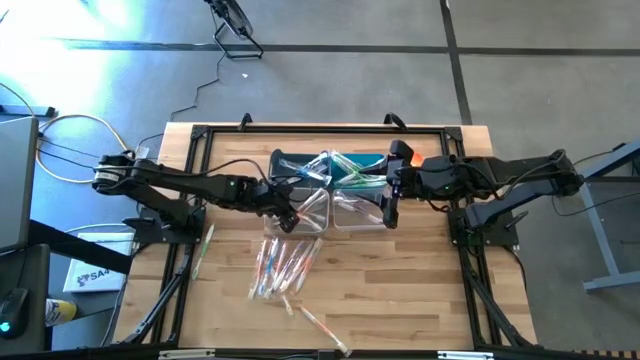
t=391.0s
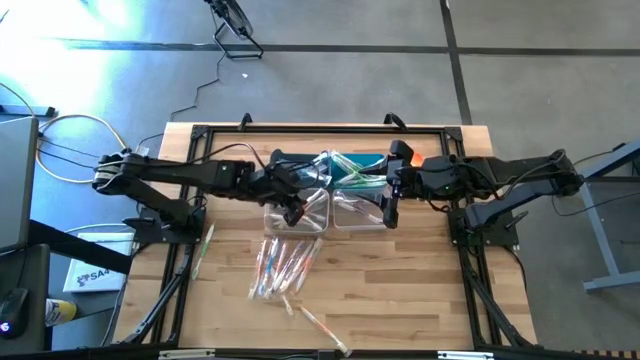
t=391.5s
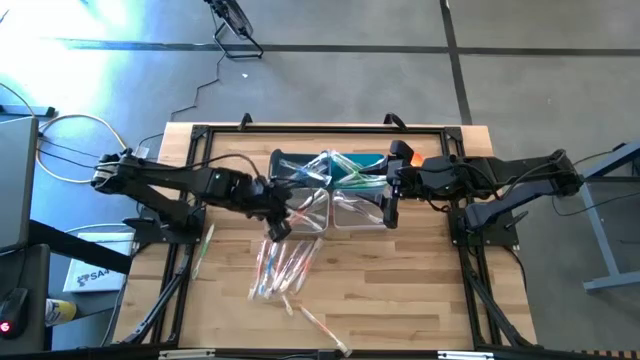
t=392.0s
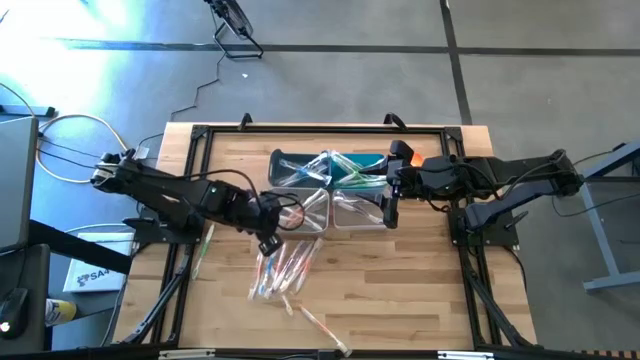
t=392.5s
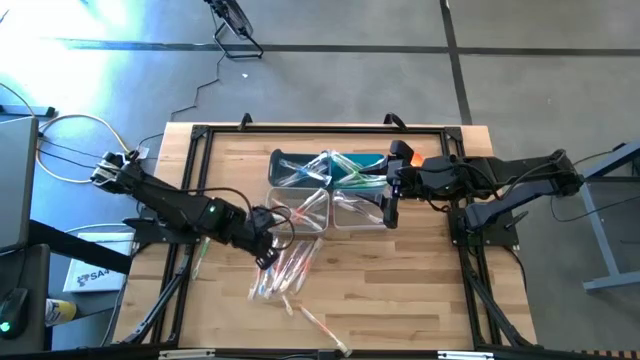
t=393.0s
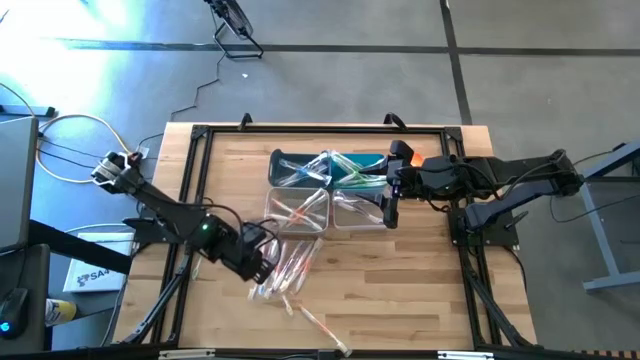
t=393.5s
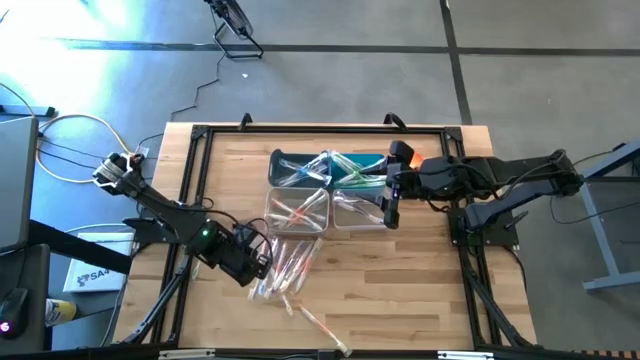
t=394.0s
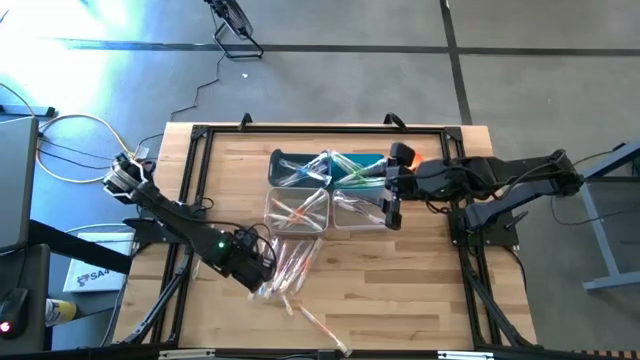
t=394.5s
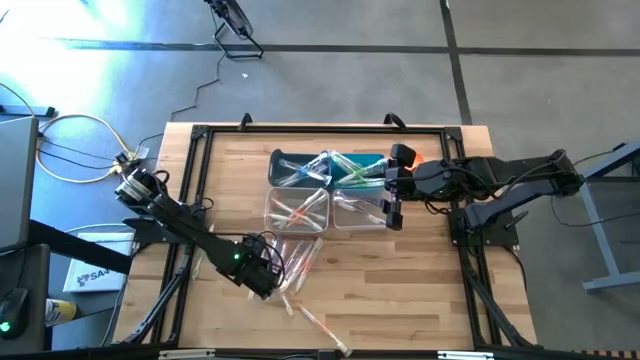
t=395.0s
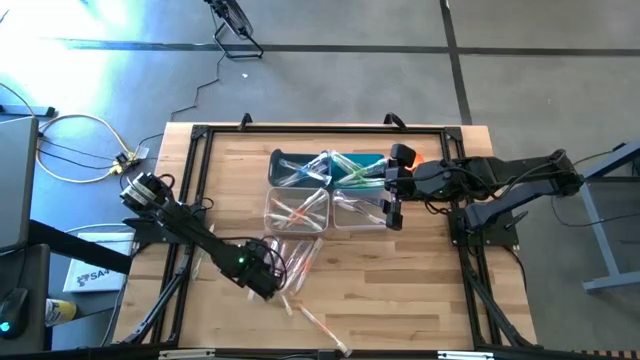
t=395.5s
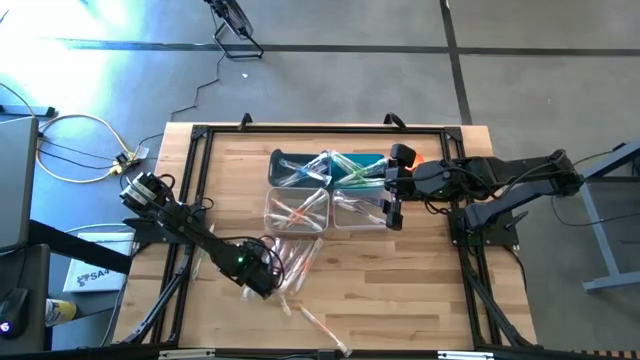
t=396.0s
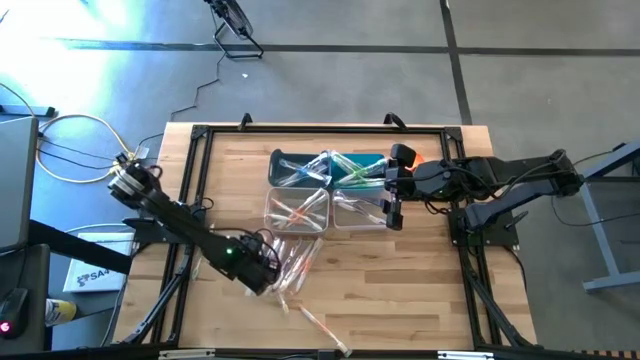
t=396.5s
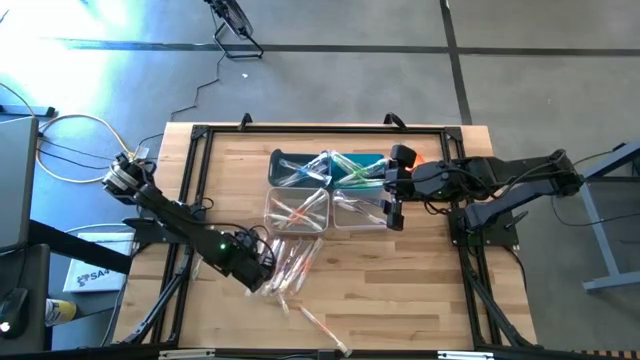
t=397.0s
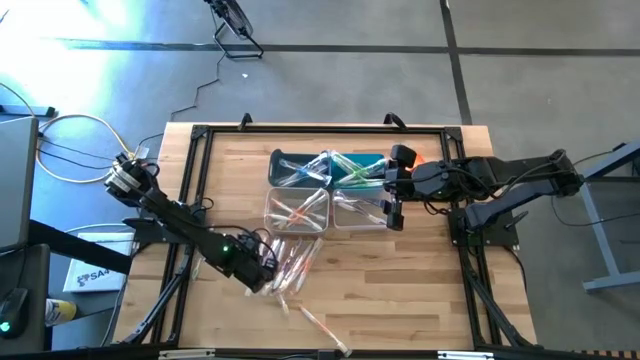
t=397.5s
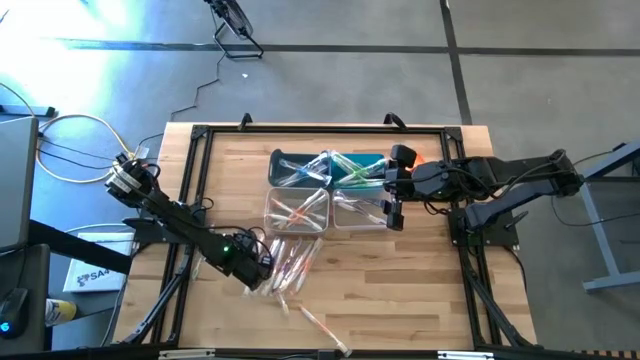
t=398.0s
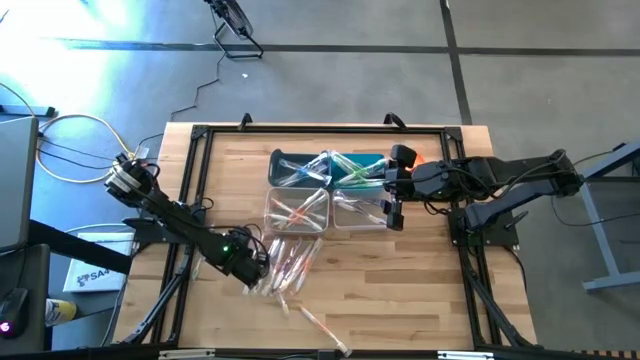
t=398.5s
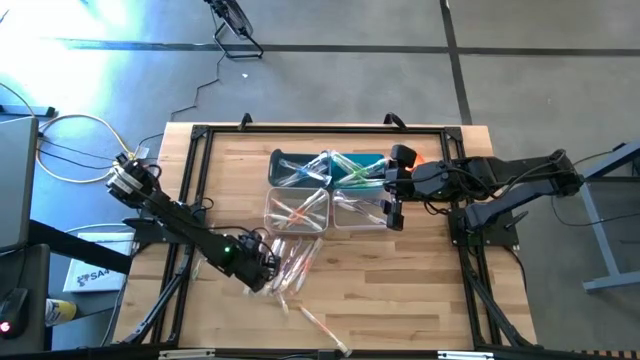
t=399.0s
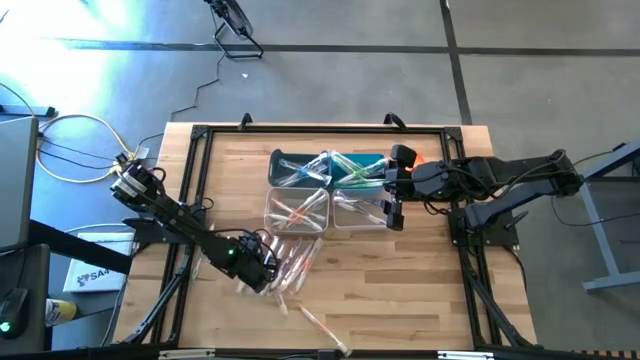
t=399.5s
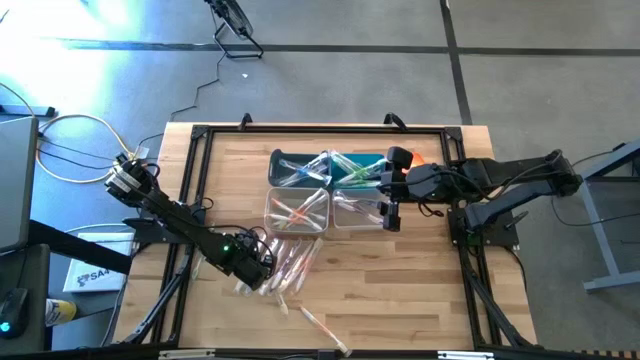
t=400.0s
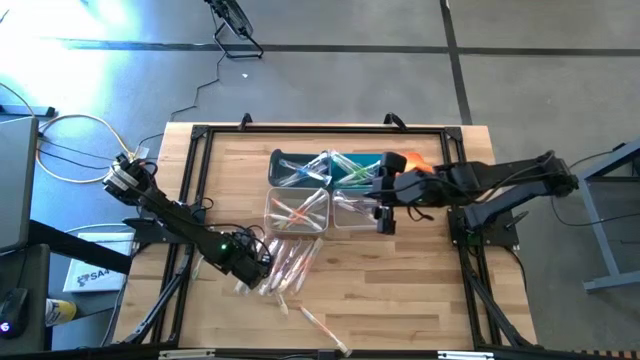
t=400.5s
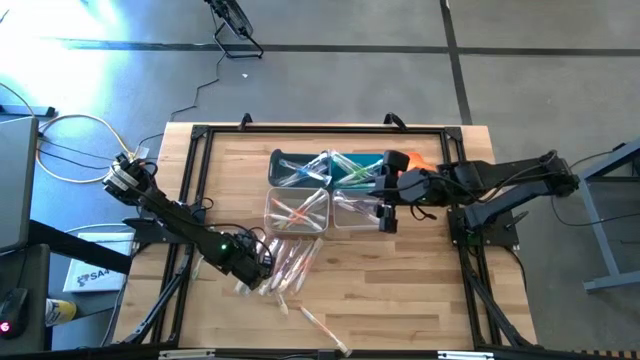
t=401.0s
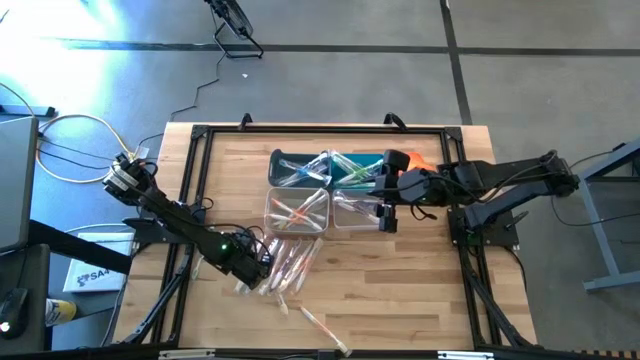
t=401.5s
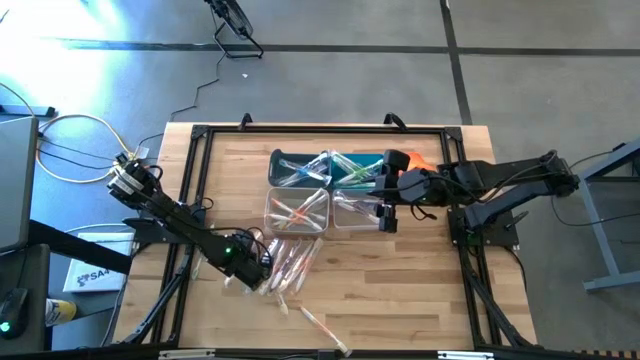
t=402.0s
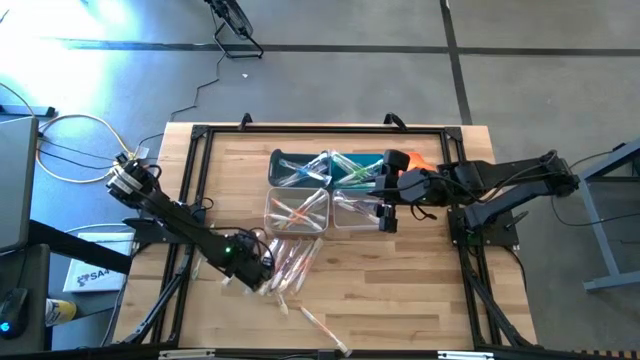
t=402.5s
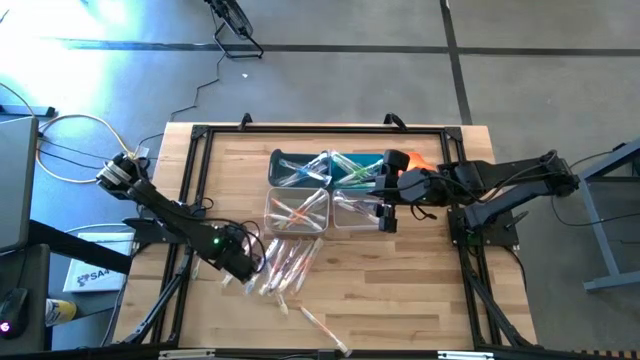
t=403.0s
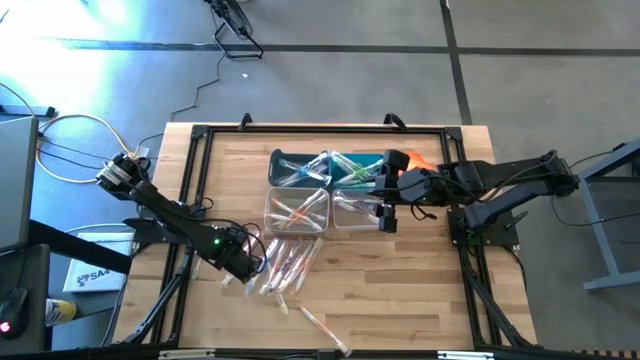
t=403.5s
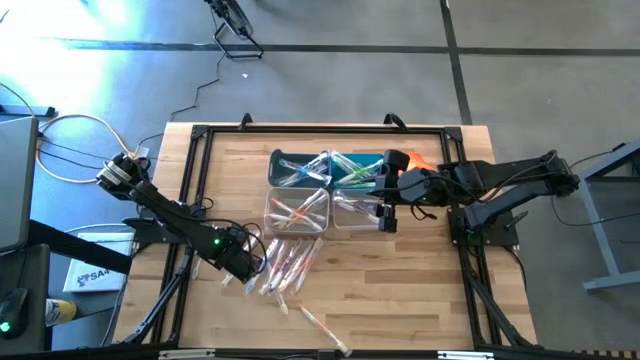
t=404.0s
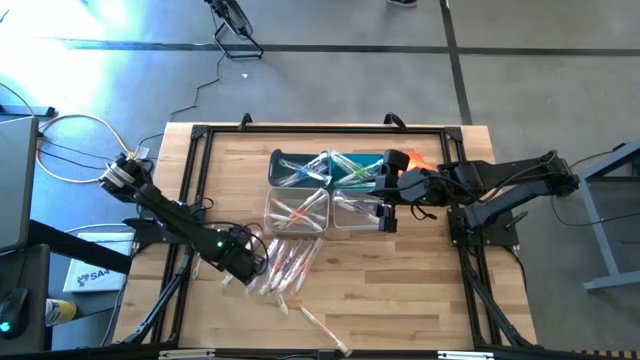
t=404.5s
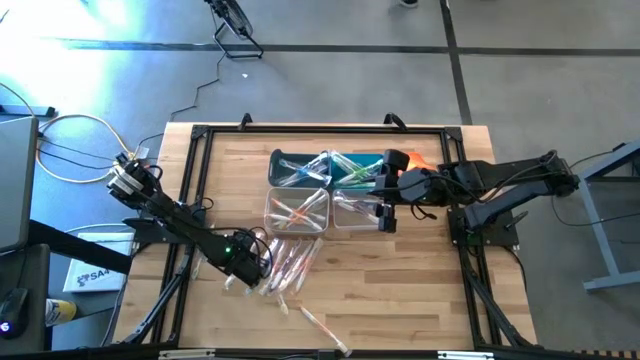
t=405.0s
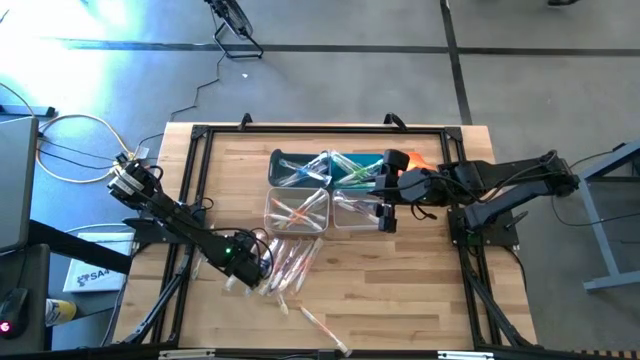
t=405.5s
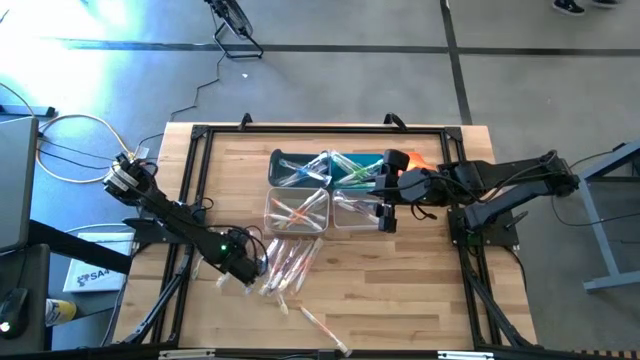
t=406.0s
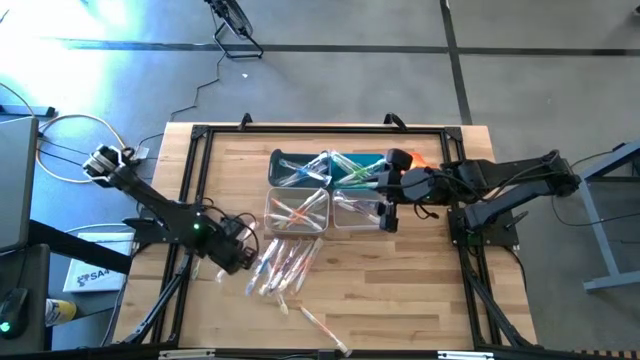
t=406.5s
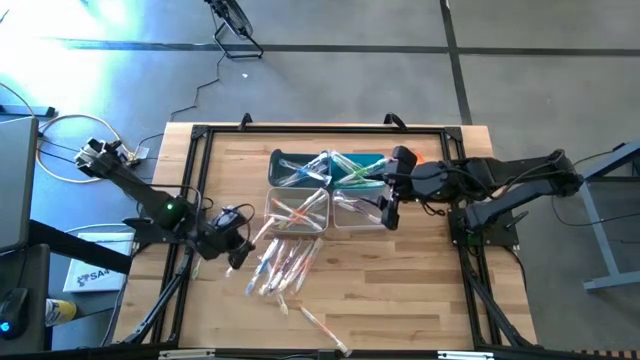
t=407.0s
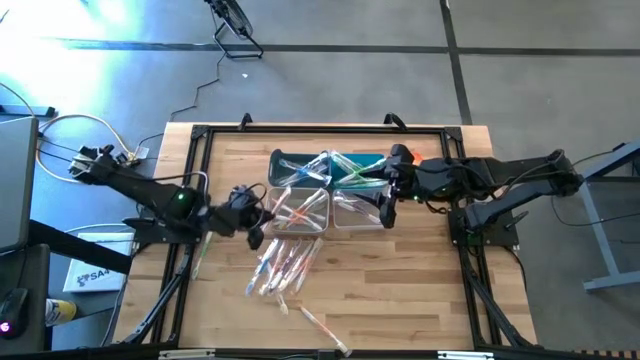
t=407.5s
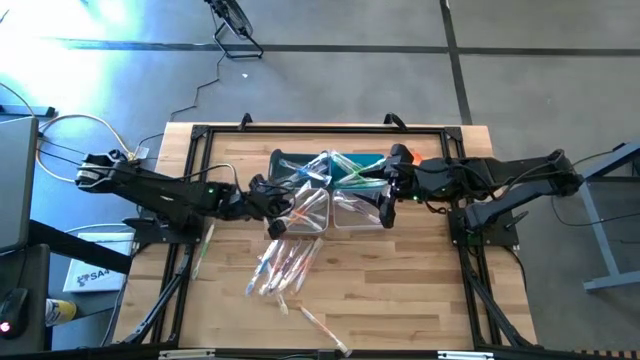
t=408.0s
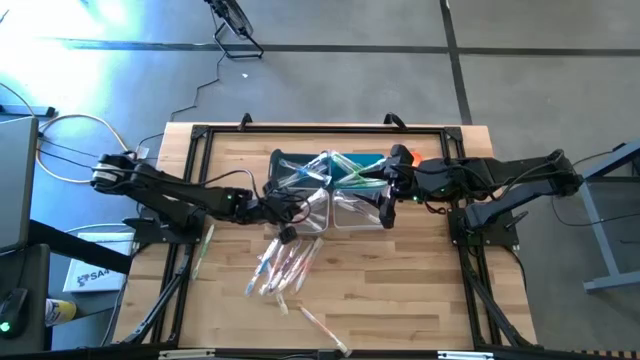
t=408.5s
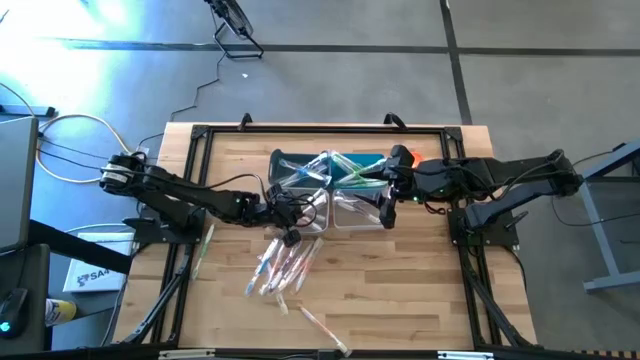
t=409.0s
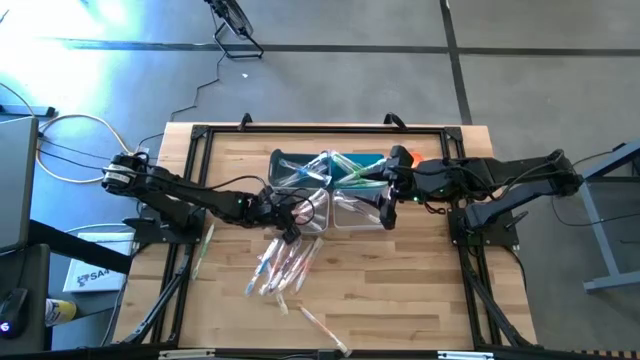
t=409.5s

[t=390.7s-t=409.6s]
Task: Pick & Place Toothbrushes
Put the orange toothbrush into the gray bin

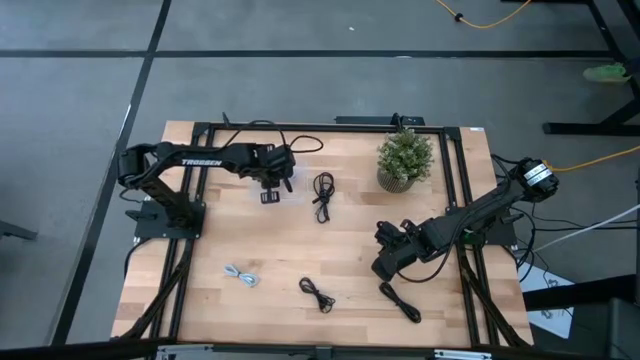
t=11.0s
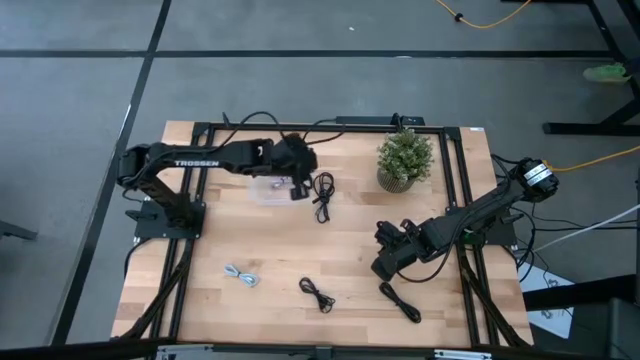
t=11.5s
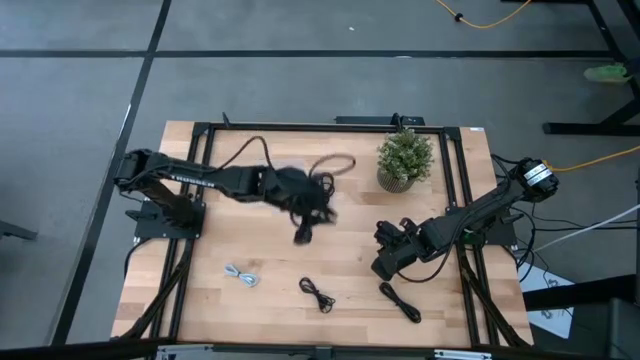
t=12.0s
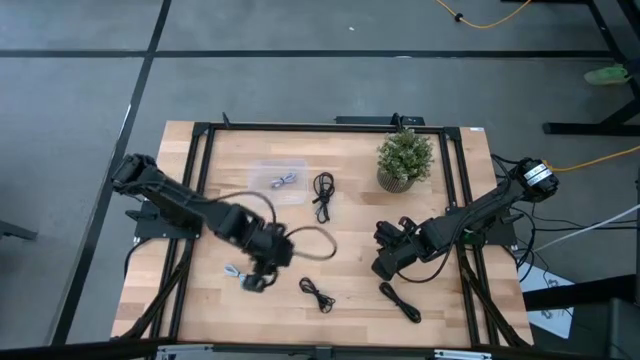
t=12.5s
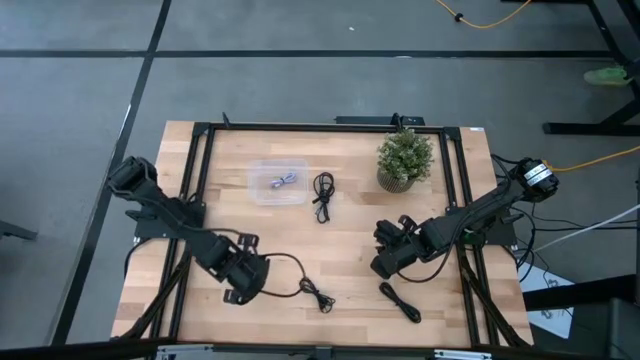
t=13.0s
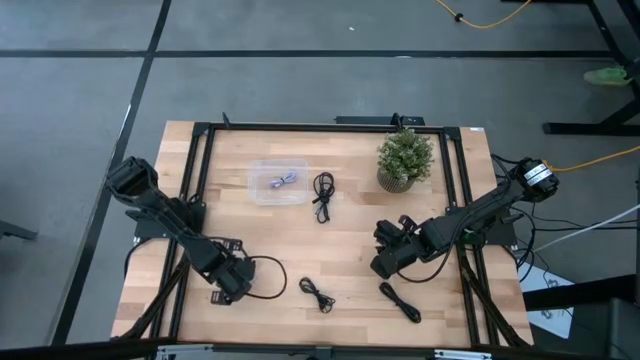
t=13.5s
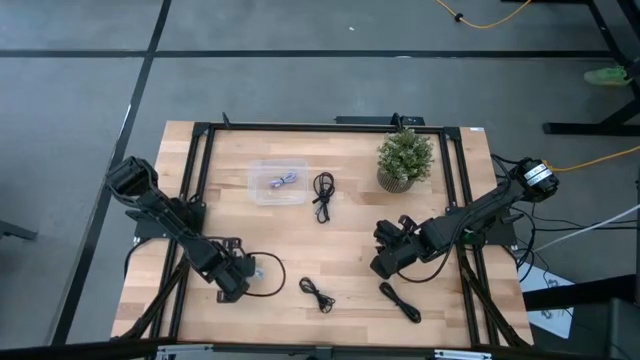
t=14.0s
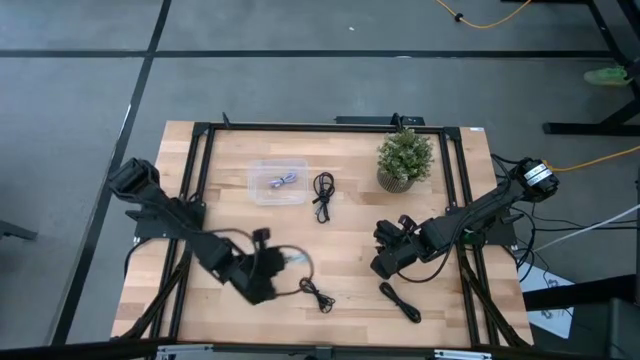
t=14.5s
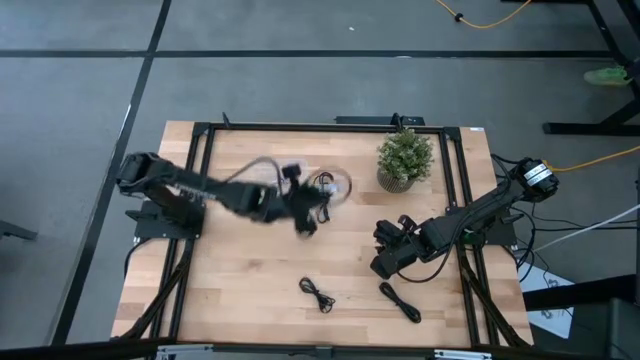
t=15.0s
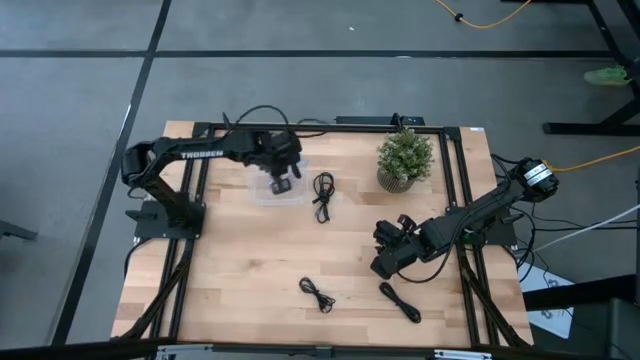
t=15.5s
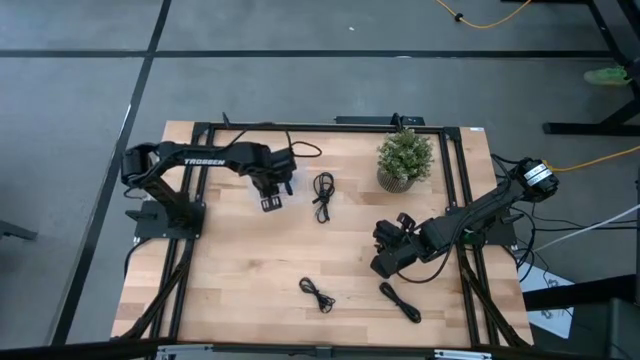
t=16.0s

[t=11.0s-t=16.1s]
Task: Pick and place USB-C Cables
Put the white USB cable into the transparent bin
